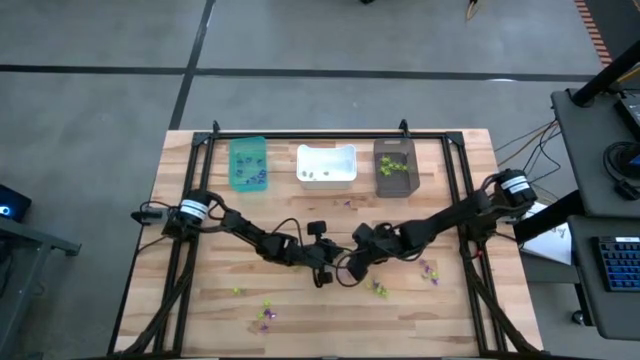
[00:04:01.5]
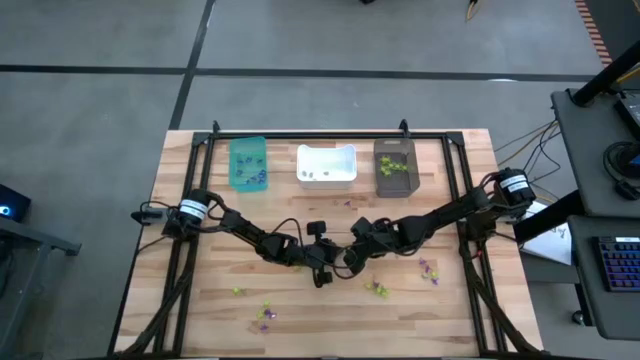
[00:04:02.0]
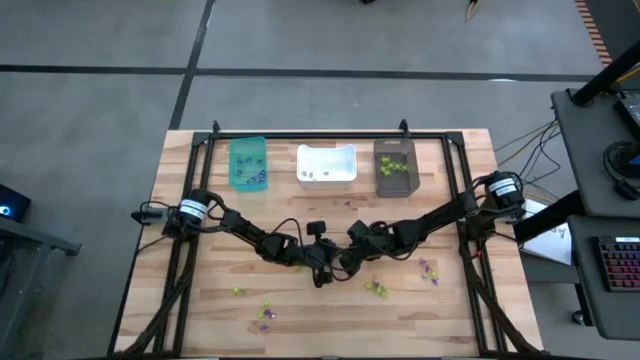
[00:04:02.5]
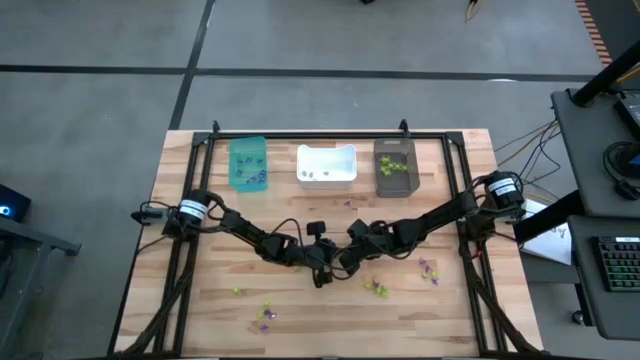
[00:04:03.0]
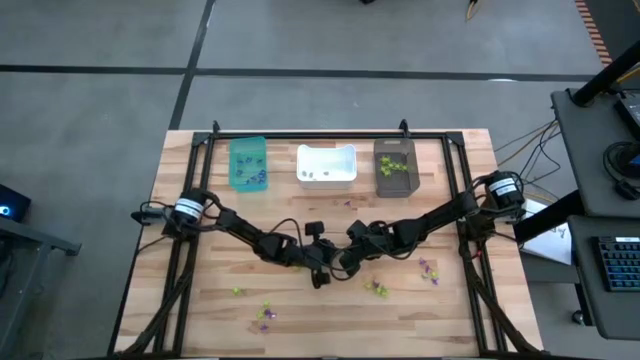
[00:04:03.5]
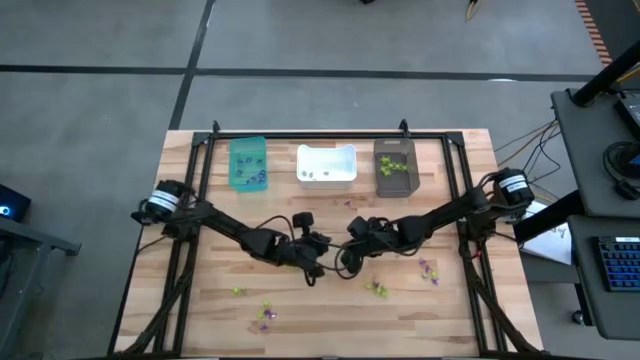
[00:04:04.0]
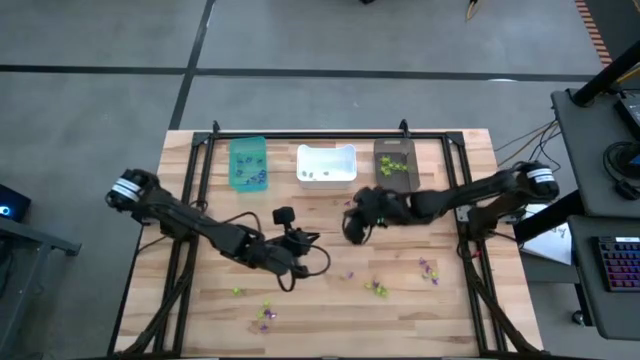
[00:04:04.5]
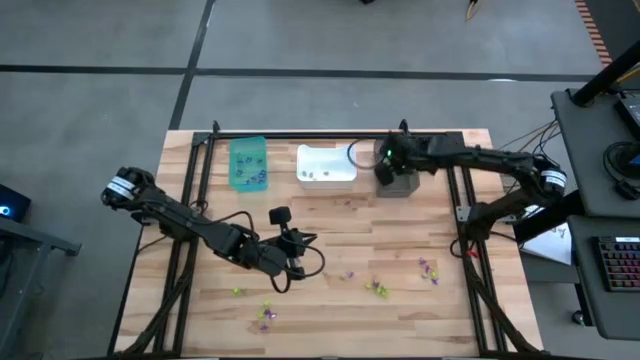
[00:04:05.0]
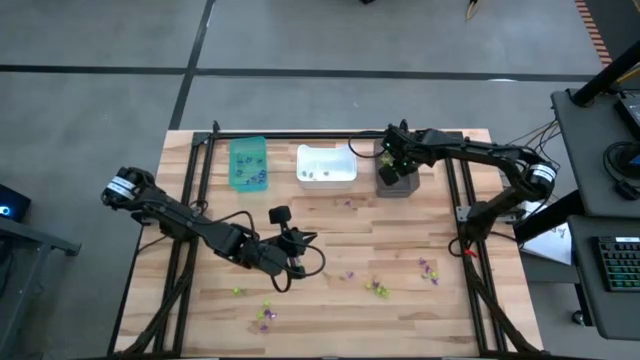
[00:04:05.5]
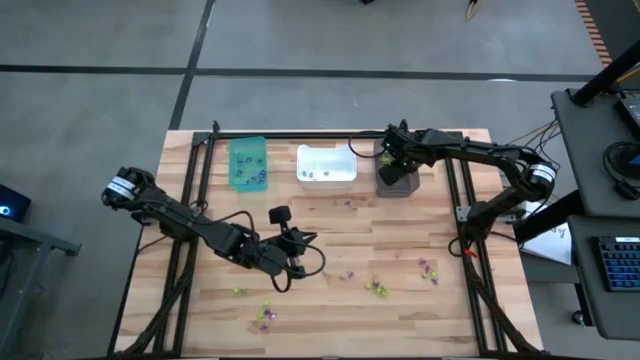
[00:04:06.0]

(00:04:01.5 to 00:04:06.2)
Task: Sort Halloween decoration
Put the green spider toy into the black bin

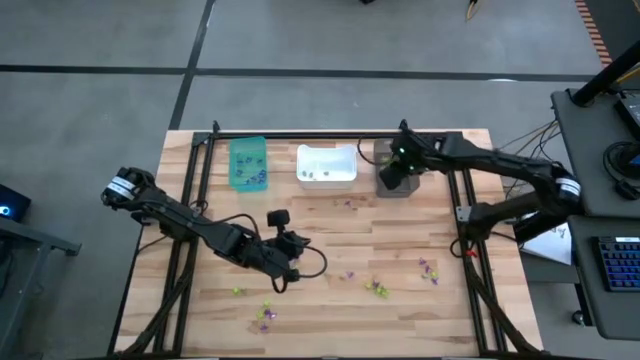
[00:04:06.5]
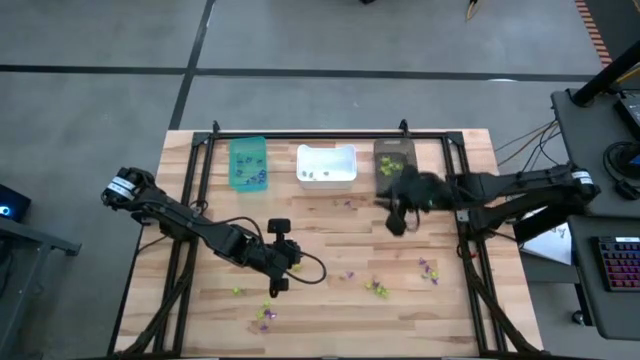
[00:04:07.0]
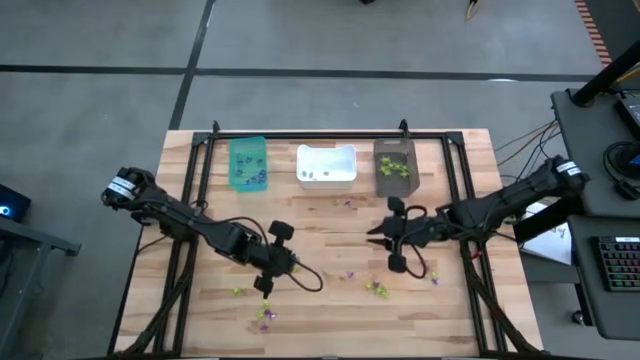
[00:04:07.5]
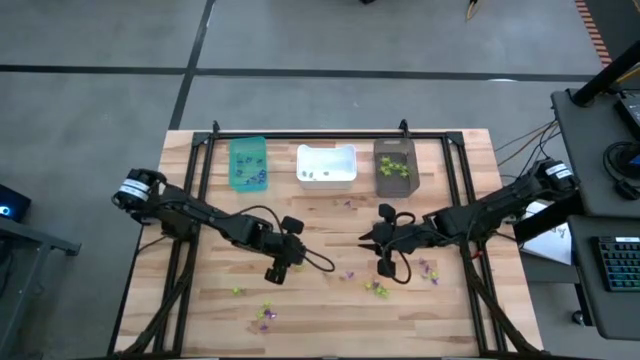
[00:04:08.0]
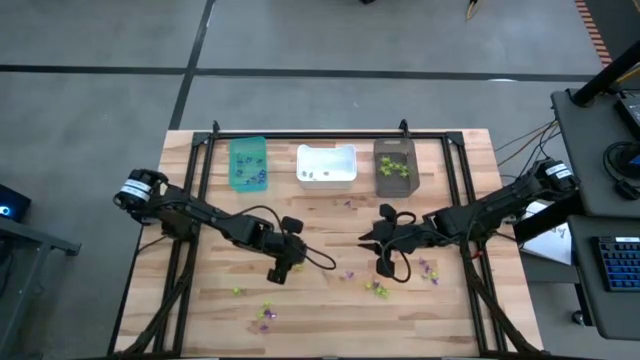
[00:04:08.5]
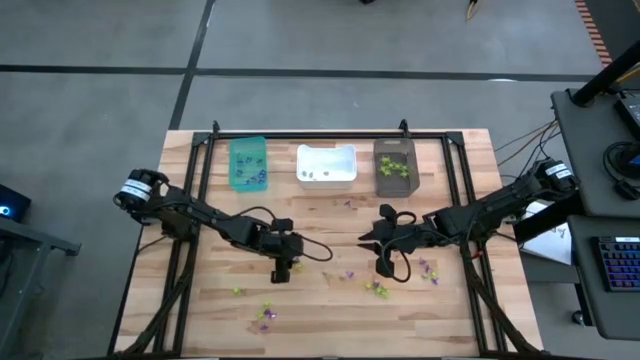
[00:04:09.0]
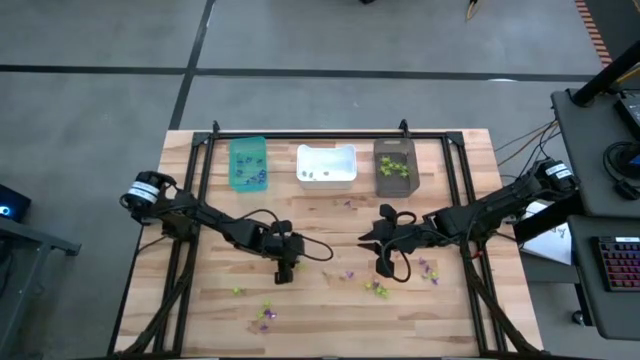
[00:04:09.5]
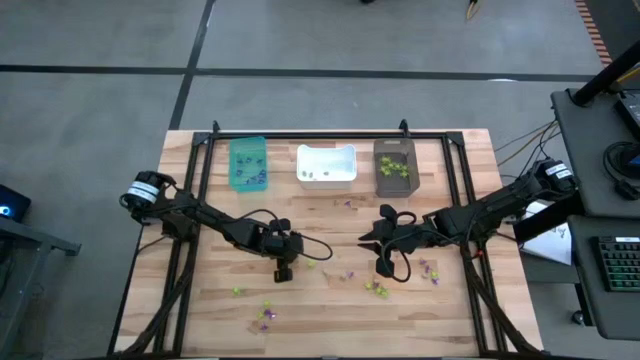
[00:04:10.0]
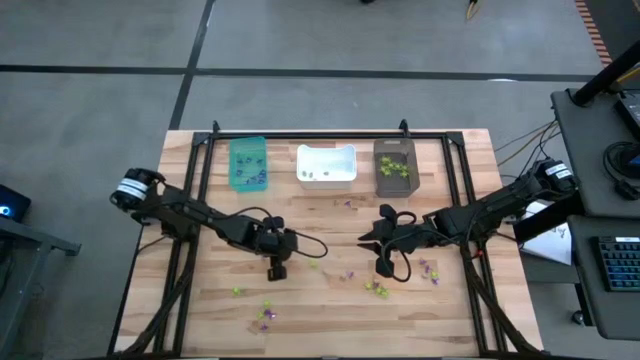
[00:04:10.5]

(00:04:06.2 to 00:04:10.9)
Put the purple witch hat toy into the light blue bin

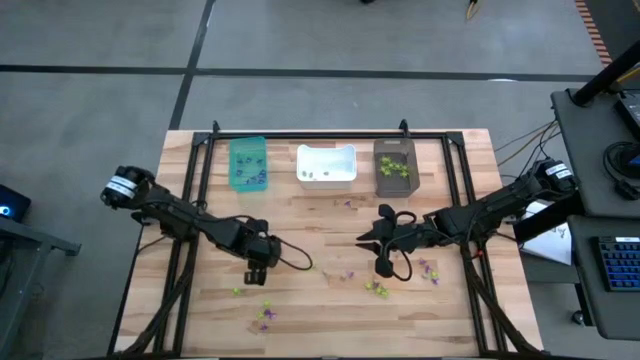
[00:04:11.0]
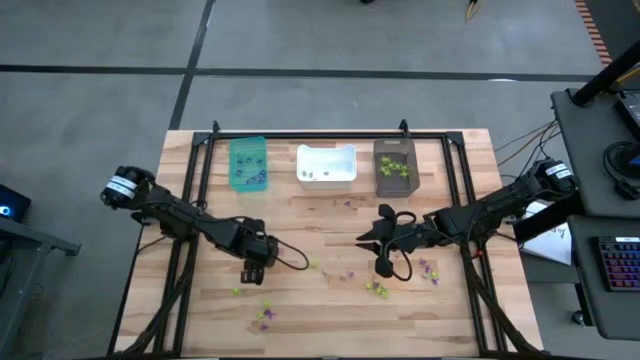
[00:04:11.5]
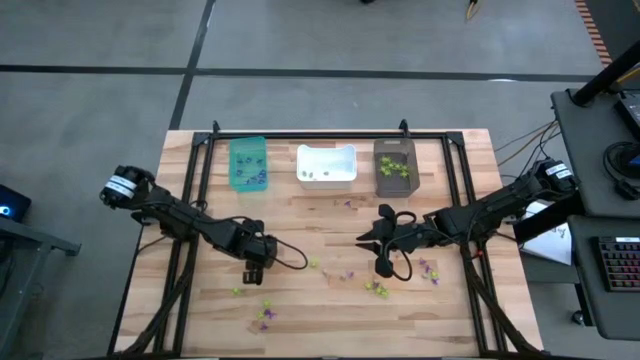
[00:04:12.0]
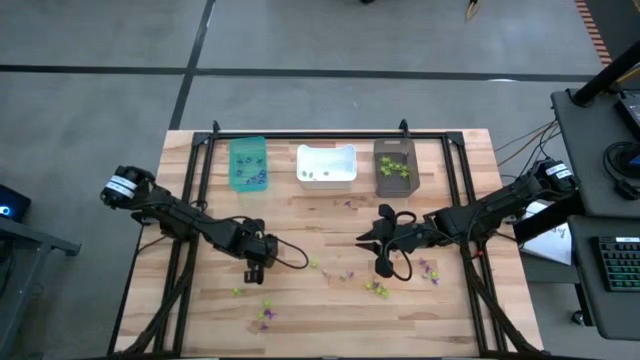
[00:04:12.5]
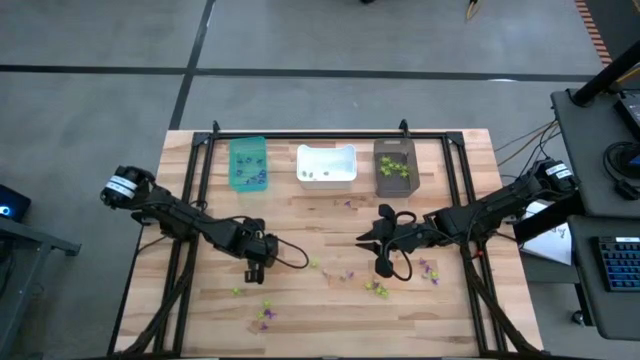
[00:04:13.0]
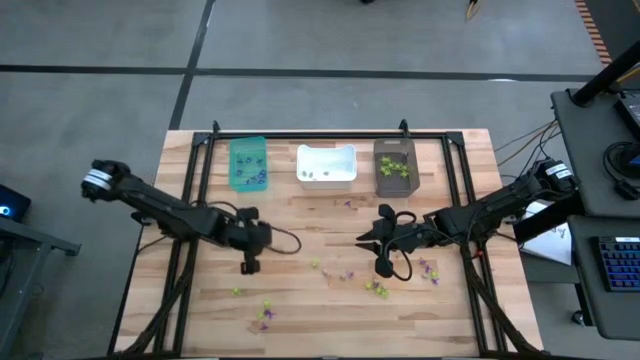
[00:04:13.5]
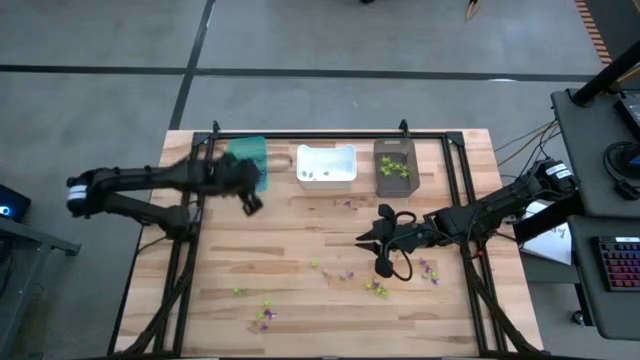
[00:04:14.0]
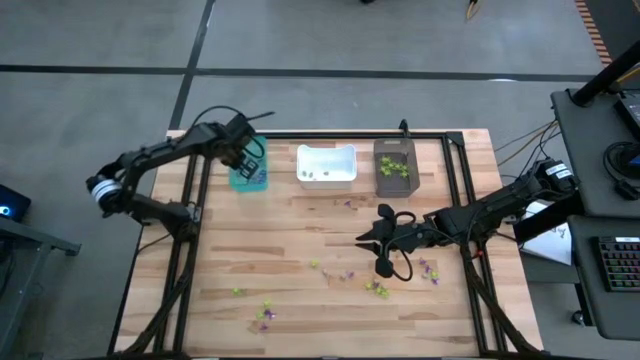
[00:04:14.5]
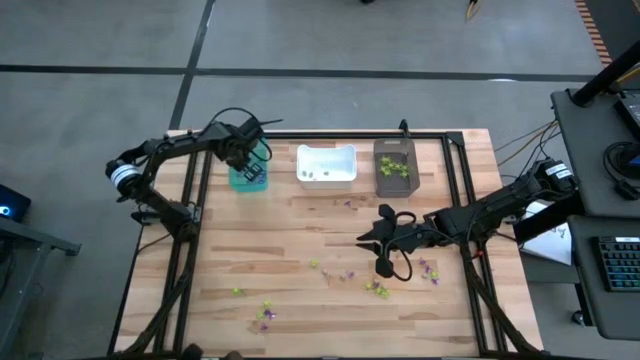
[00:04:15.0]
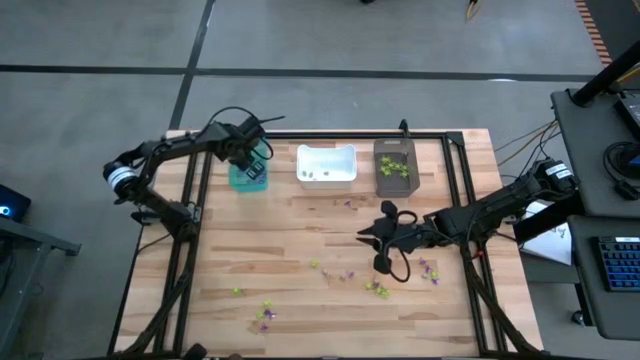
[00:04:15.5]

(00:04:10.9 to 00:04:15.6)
Put the purple witch hat toy into the light blue bin

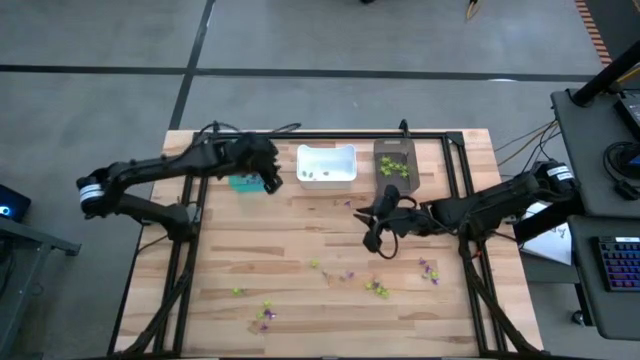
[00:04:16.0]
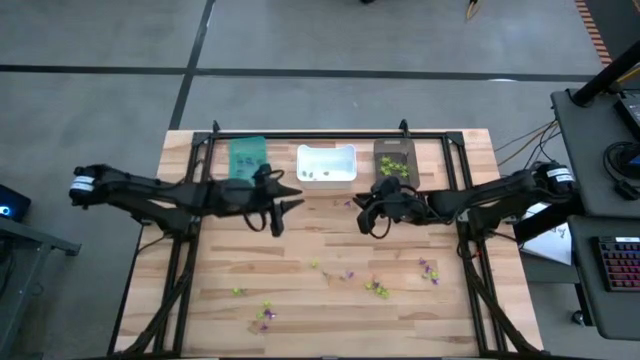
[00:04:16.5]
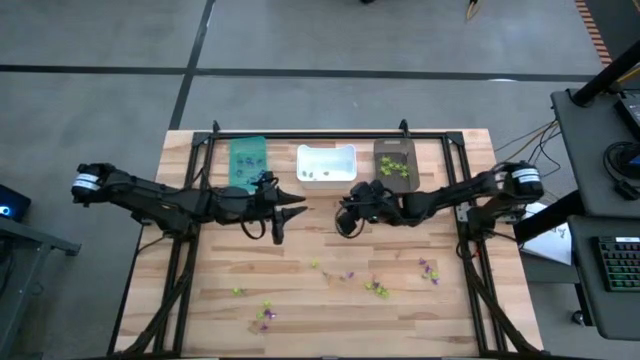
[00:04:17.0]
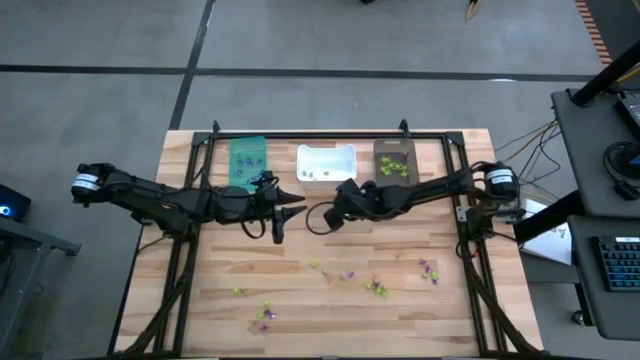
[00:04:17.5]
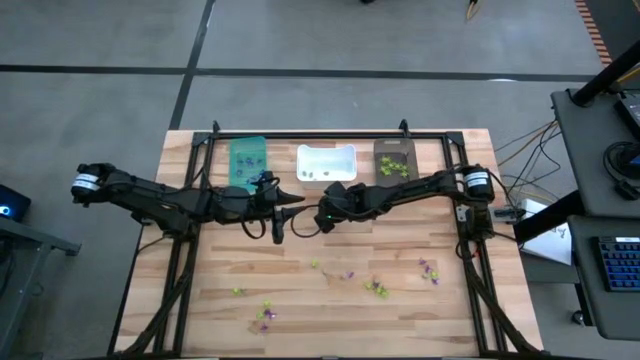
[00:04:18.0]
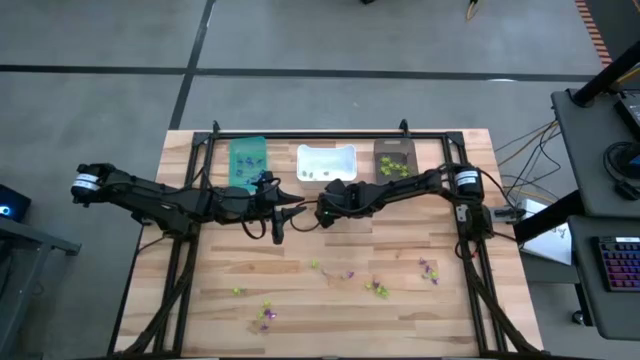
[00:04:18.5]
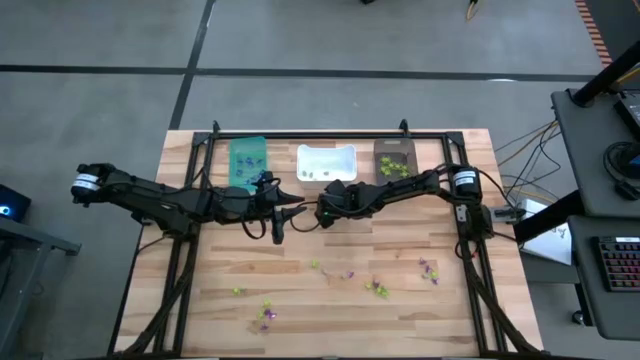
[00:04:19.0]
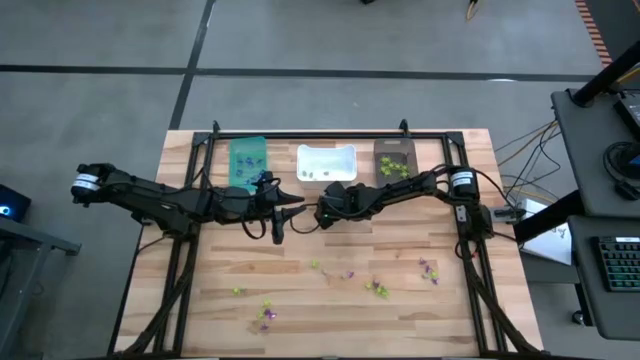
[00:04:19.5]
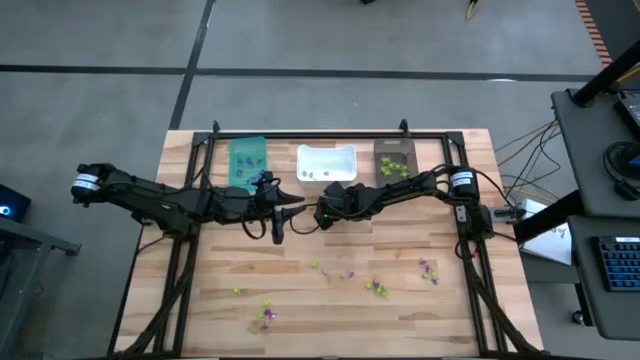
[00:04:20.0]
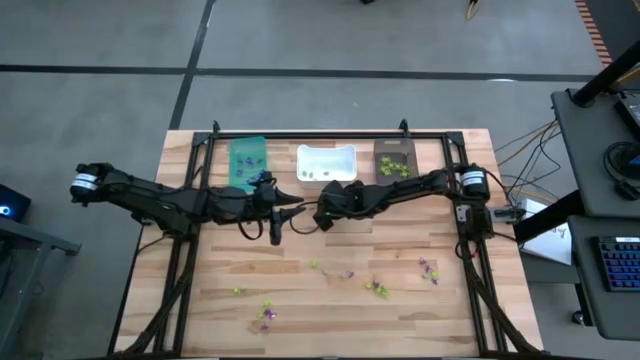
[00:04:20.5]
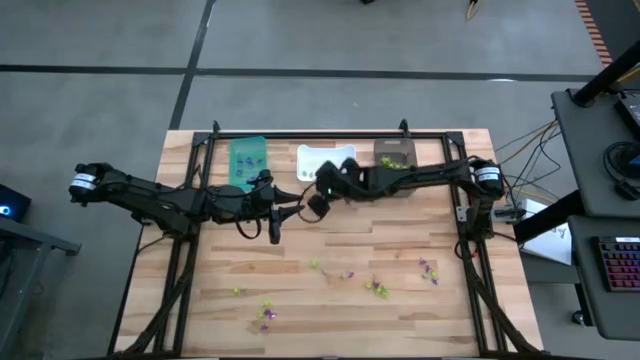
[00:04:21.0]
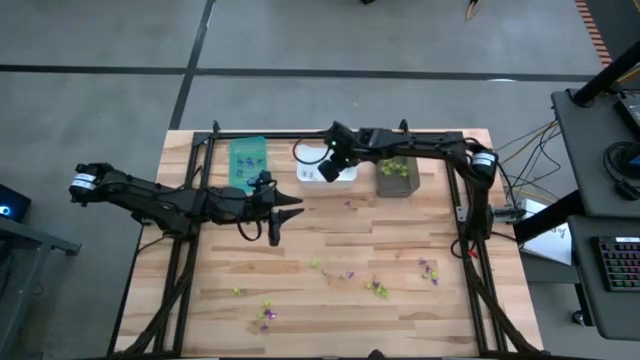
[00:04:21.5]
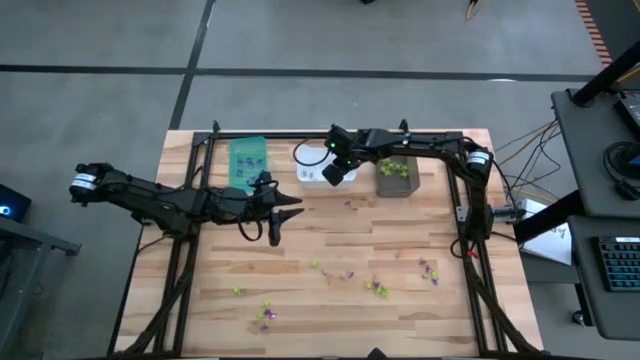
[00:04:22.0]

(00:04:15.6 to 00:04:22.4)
Put the white skull toy into the white bin
